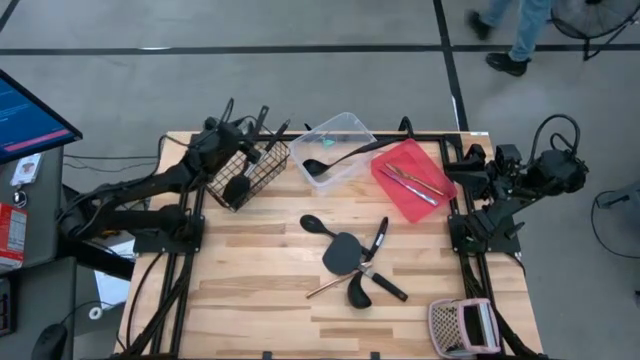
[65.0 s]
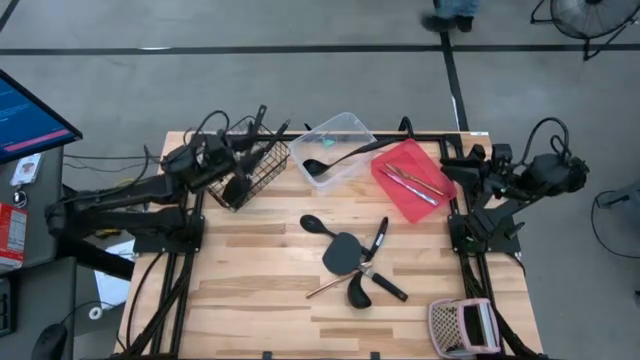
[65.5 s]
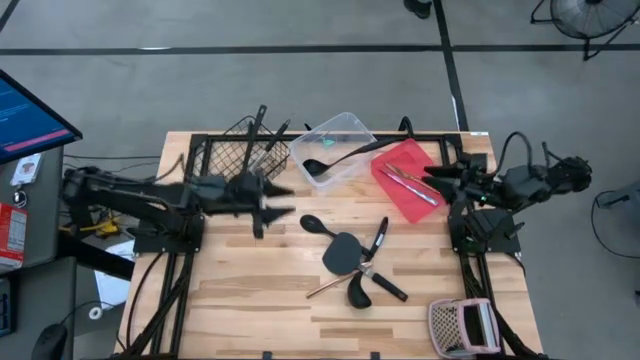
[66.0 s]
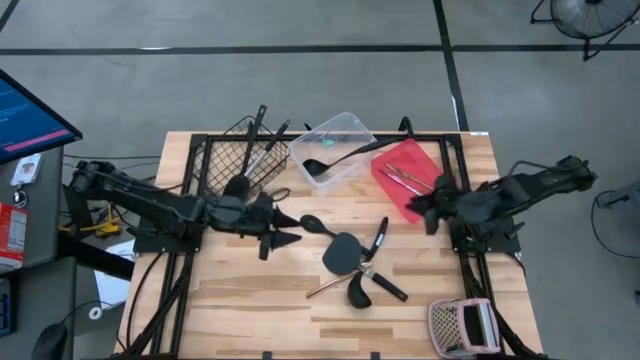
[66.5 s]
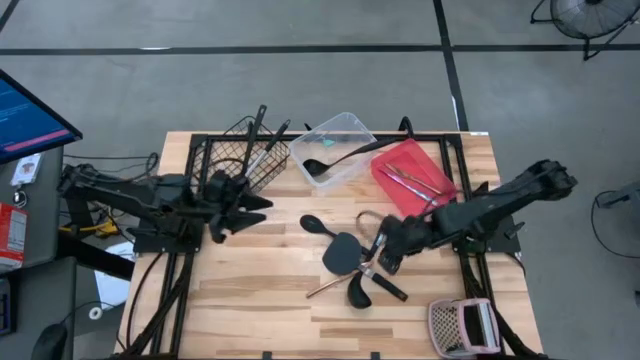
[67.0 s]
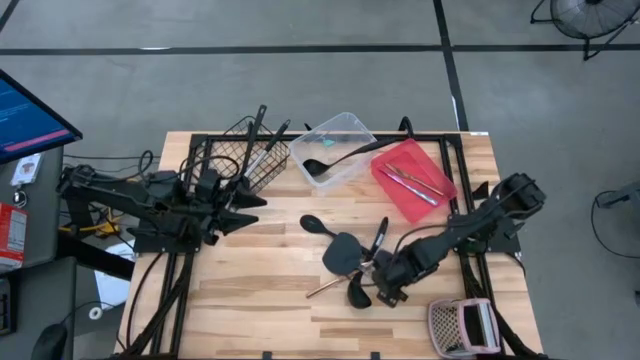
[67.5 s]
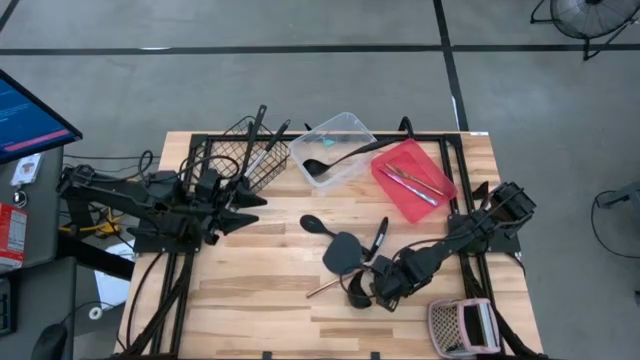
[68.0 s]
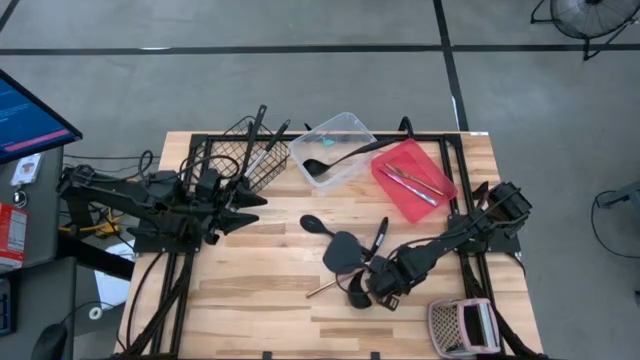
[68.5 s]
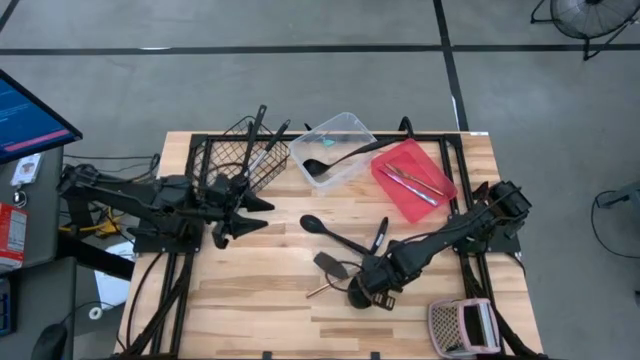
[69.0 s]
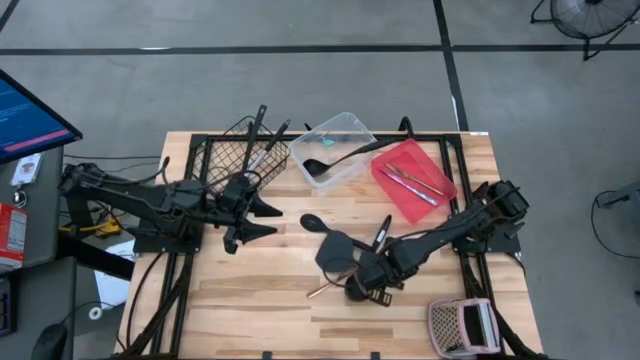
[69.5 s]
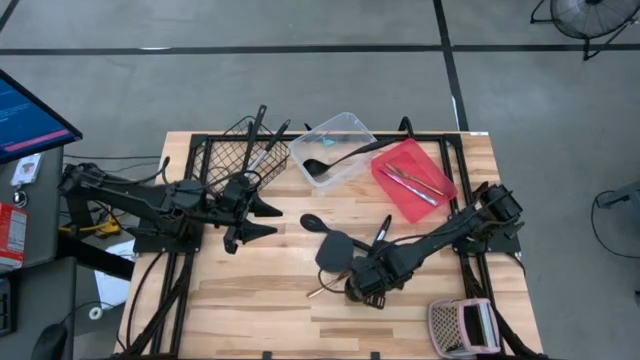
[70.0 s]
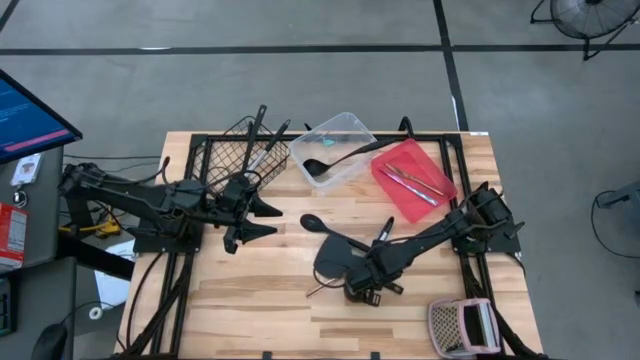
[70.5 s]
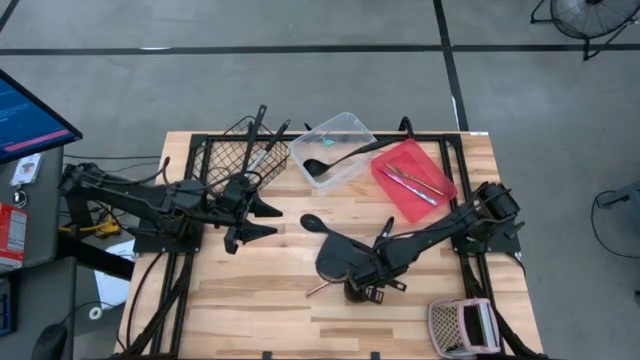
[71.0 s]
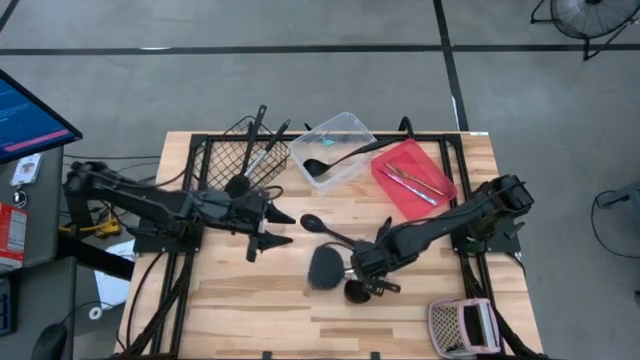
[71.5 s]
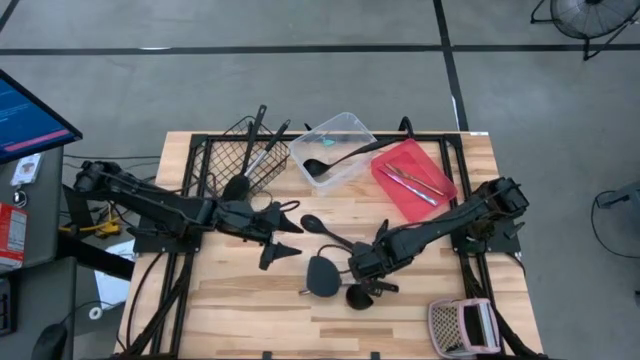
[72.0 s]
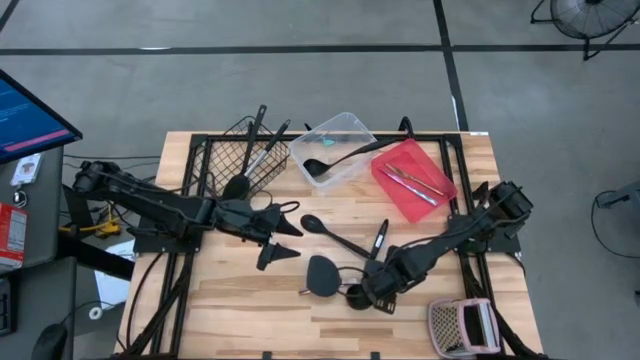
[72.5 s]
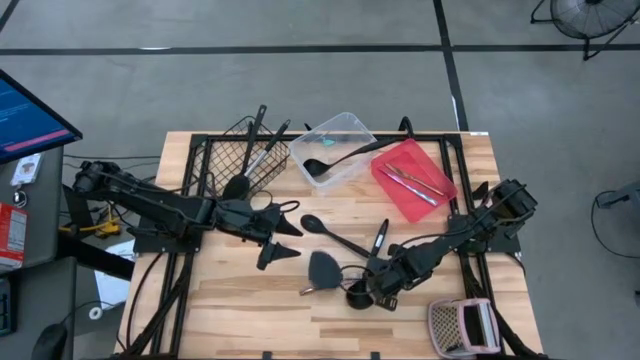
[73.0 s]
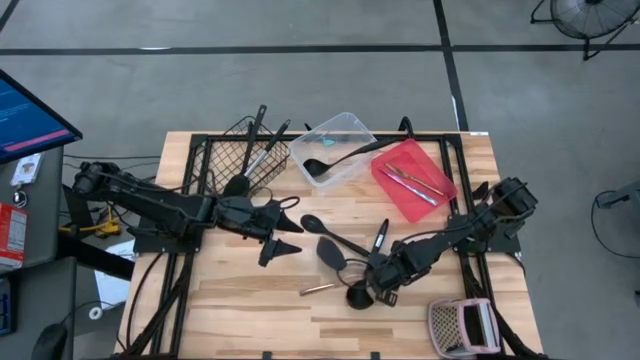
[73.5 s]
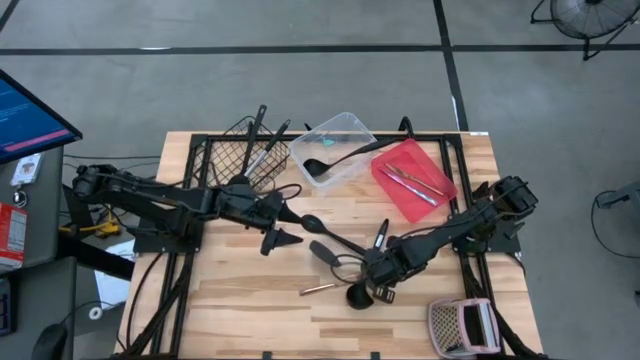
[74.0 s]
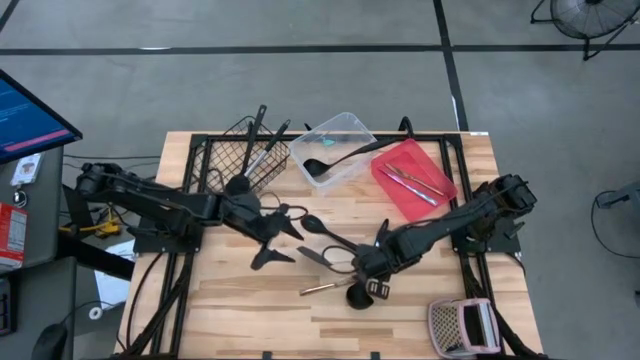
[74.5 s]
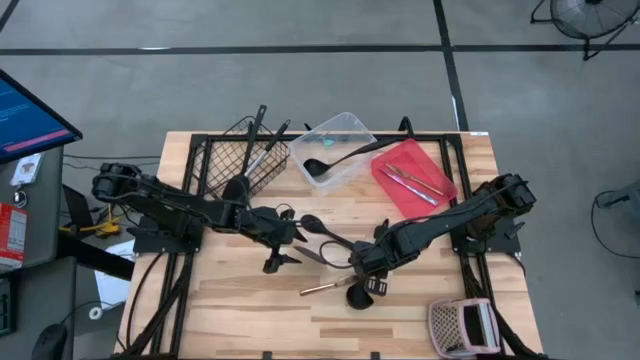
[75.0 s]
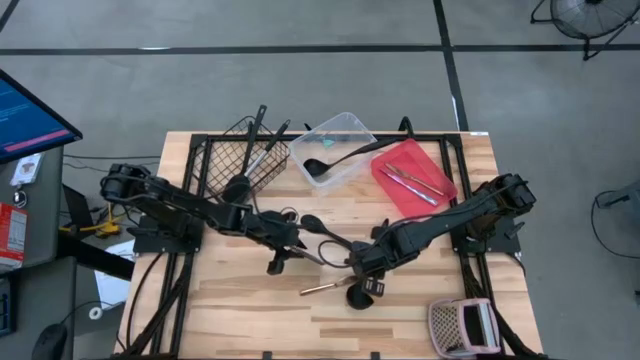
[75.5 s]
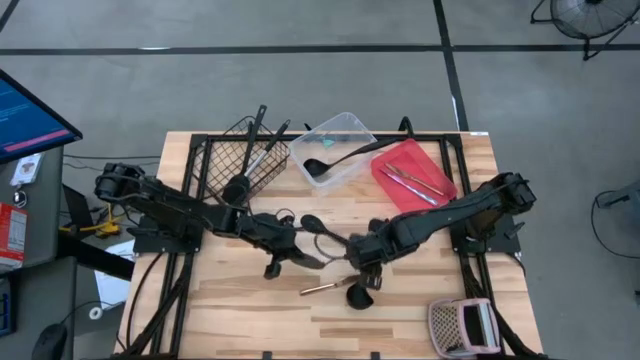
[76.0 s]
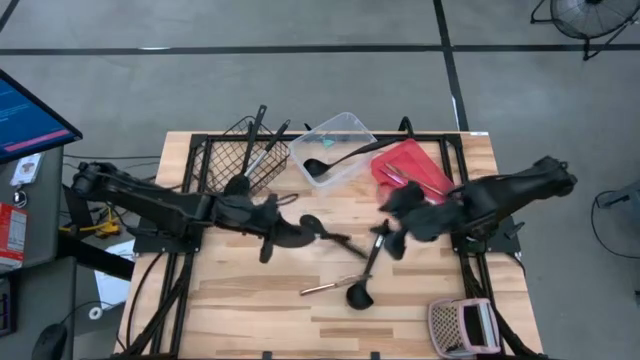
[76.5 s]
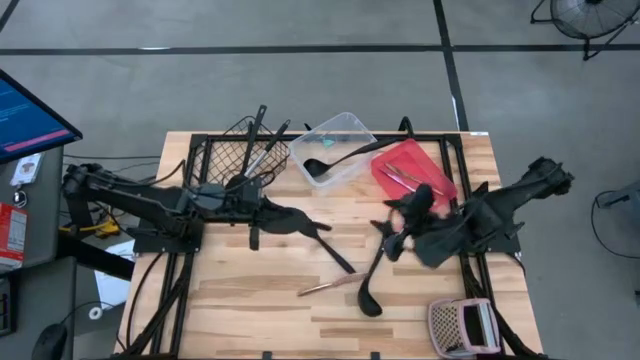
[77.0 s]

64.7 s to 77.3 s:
Task: Pick & Place Kitchen Items
Put the spatula into the wire basket

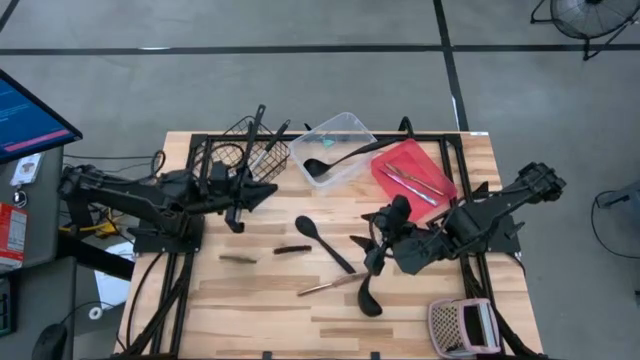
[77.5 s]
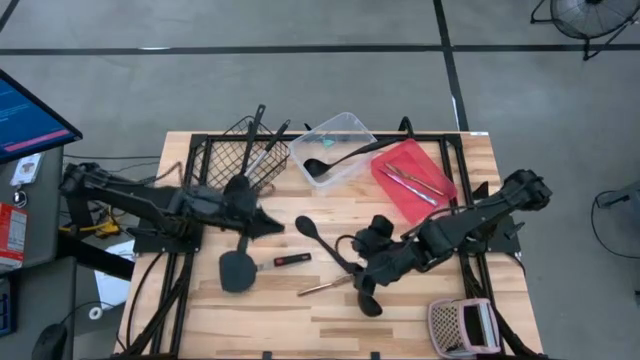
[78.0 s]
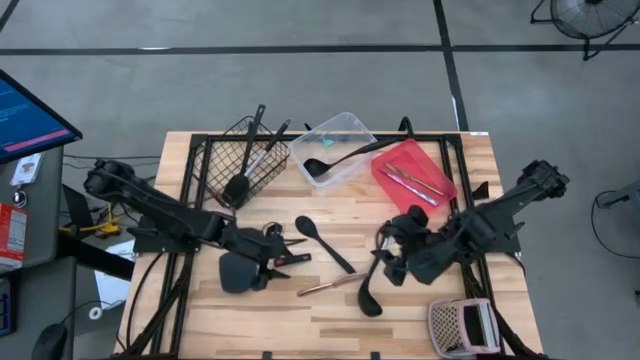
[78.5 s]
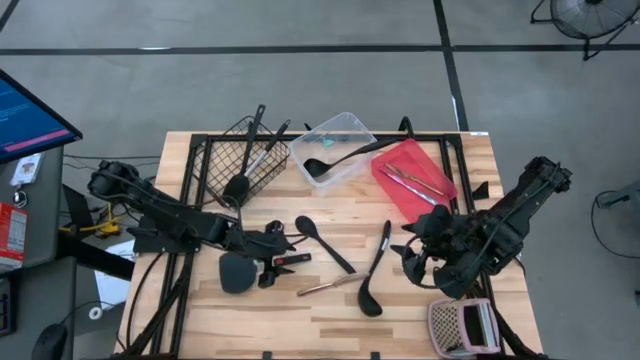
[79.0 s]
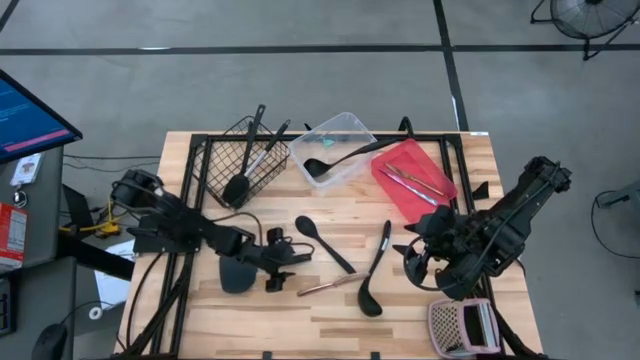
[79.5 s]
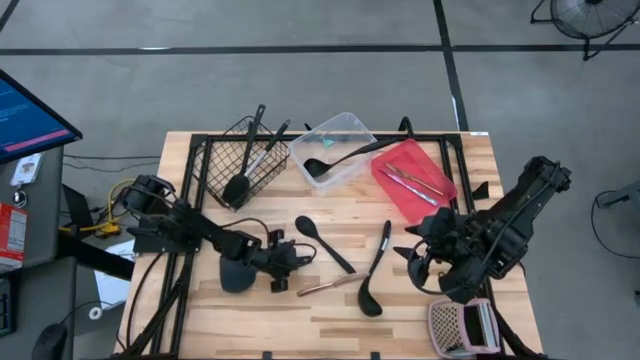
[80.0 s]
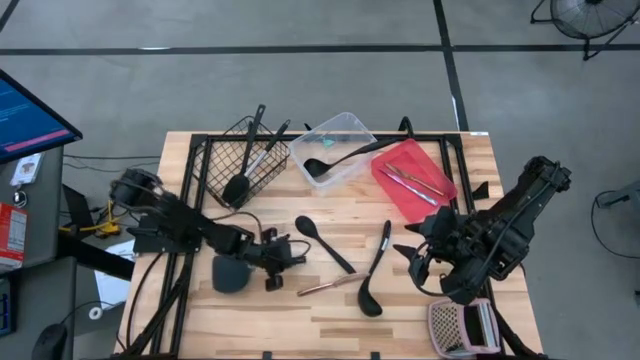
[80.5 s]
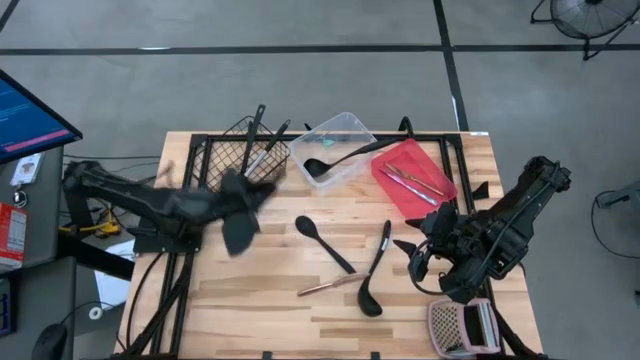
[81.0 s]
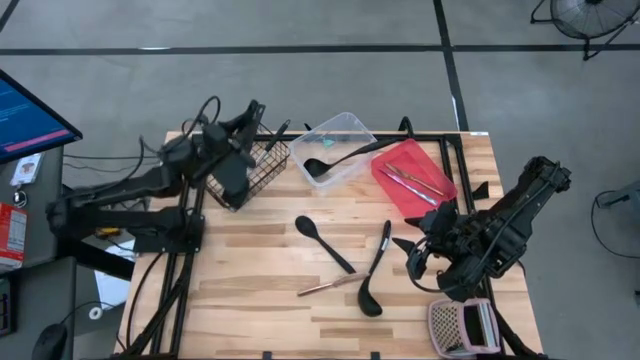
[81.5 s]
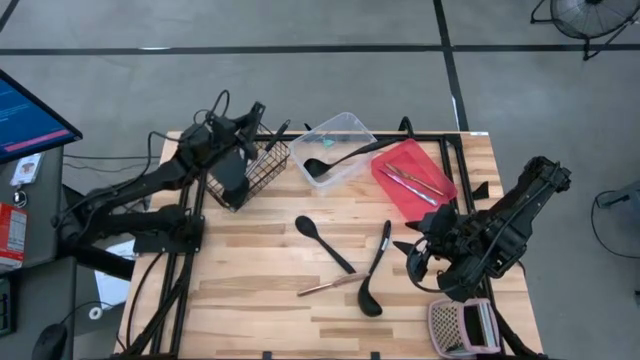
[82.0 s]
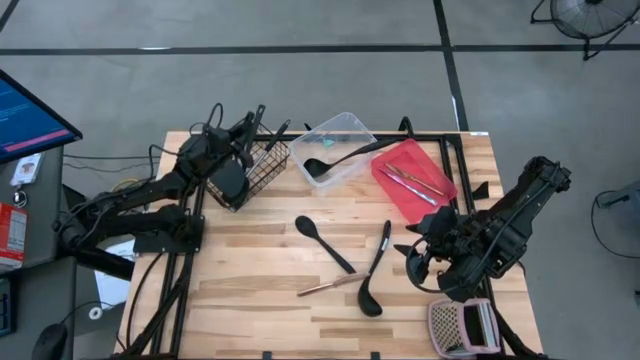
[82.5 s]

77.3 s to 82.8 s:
Put the spatula into the wire basket

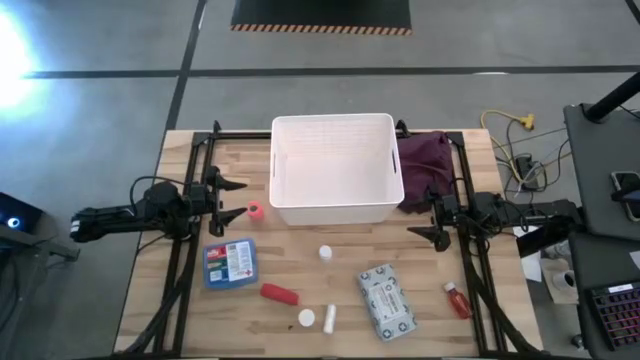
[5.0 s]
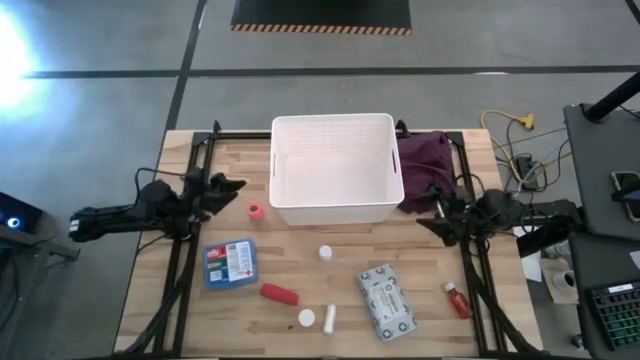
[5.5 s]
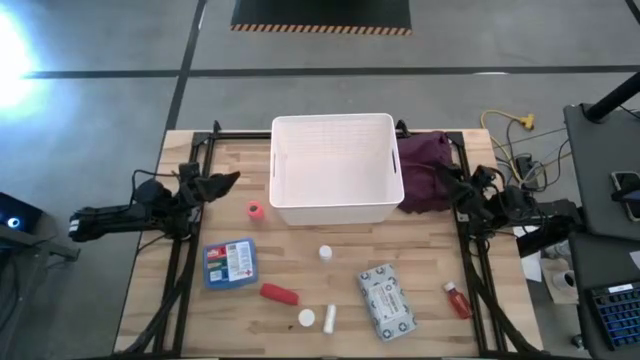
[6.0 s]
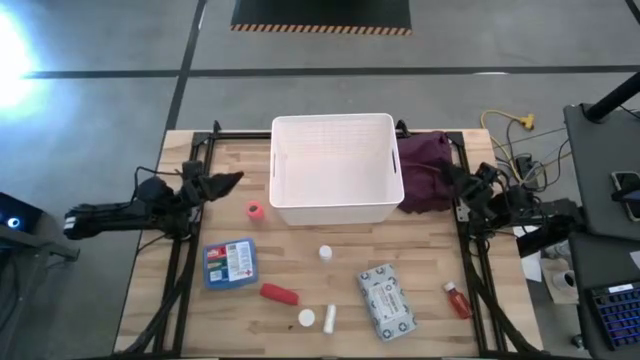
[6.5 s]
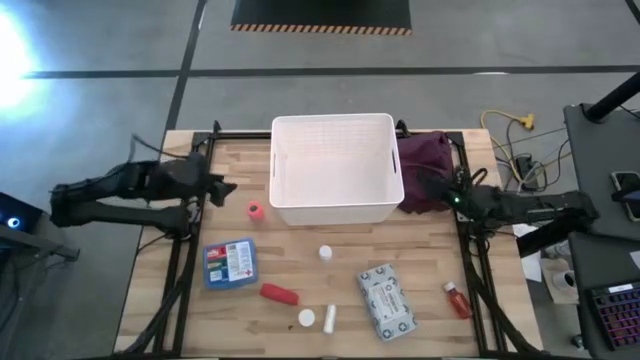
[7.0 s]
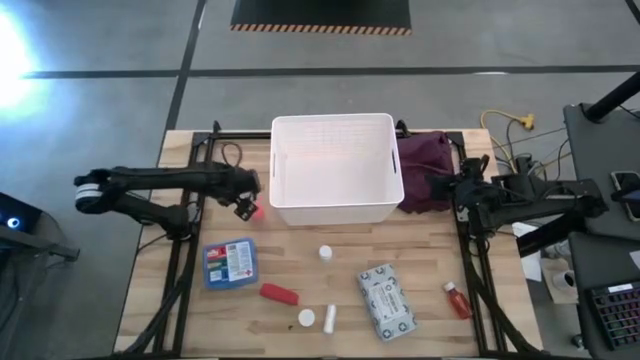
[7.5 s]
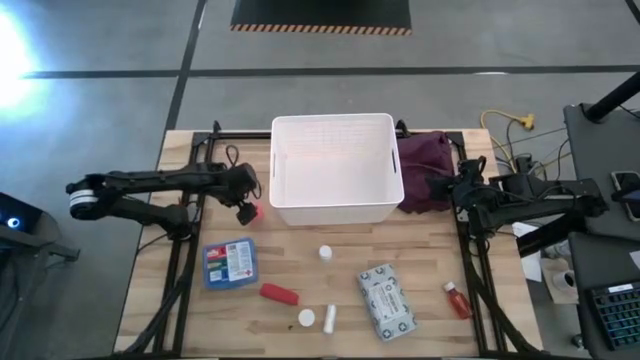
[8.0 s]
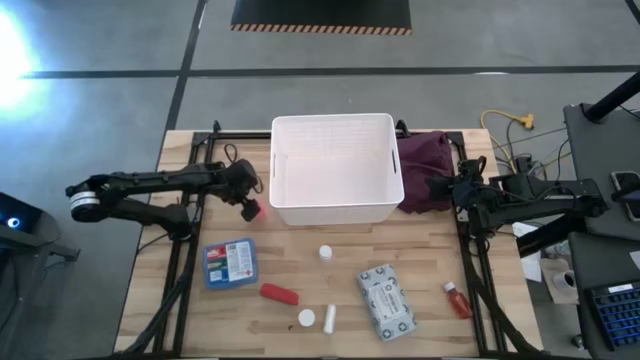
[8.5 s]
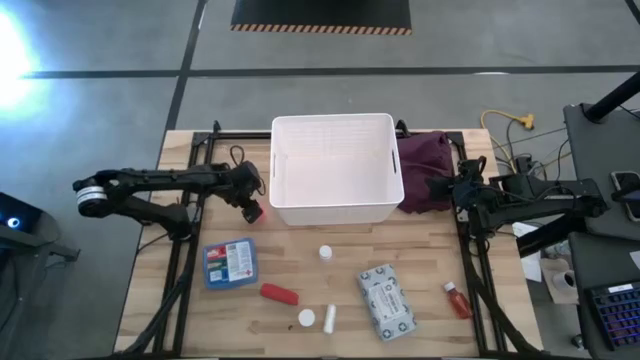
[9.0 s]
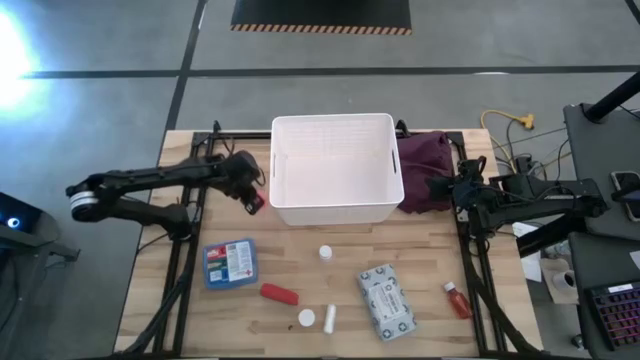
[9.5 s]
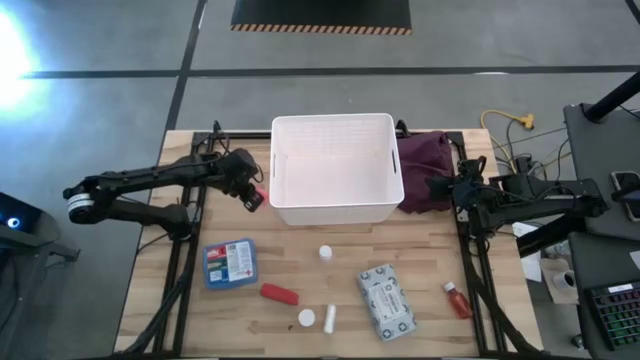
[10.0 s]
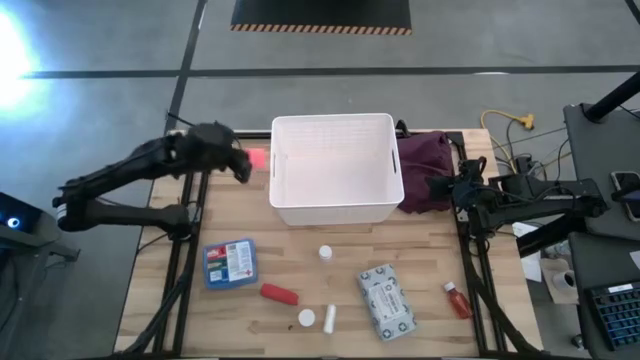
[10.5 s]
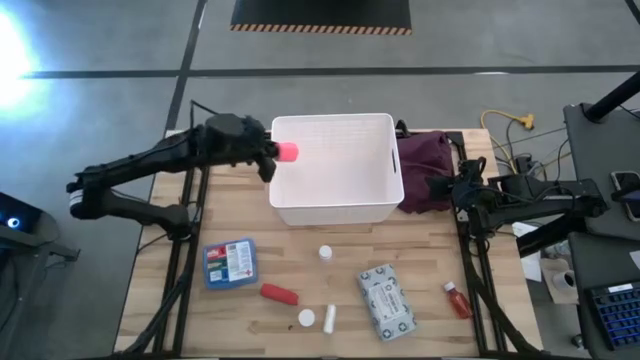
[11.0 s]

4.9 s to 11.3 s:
Task: Pick & place medical supplies in basket/bin
Put the pink bandage into the white bin
